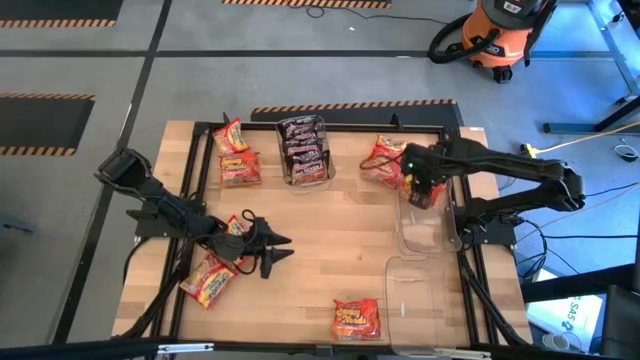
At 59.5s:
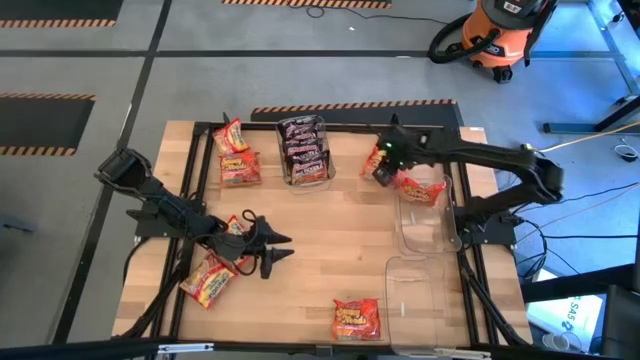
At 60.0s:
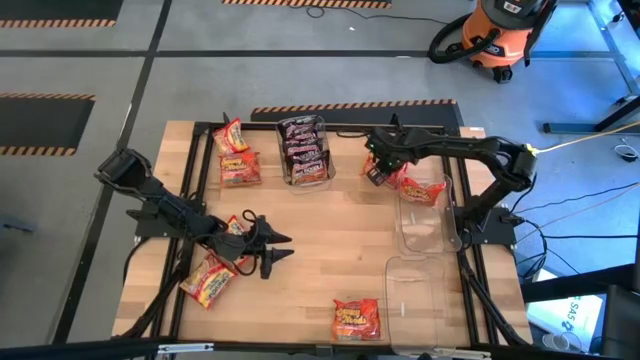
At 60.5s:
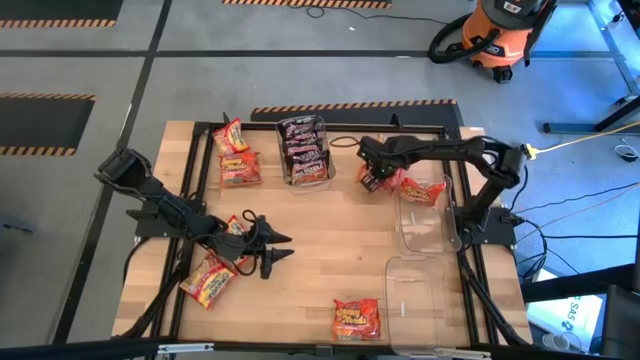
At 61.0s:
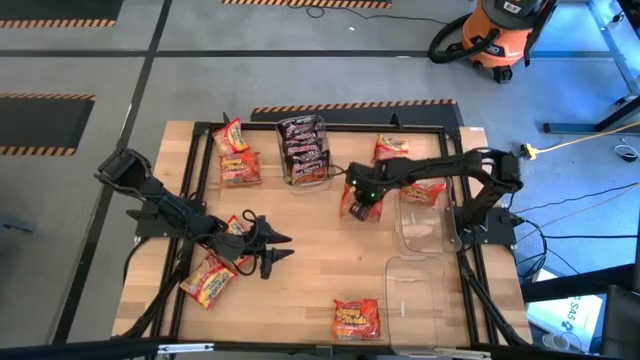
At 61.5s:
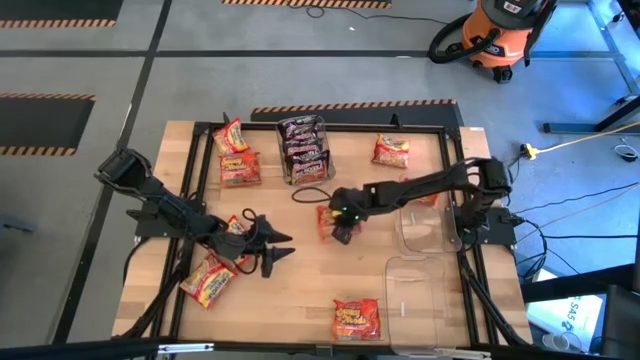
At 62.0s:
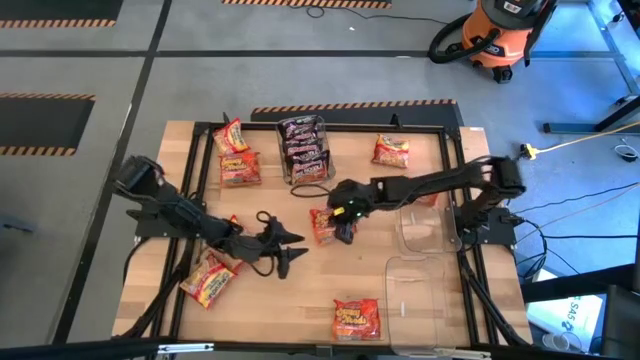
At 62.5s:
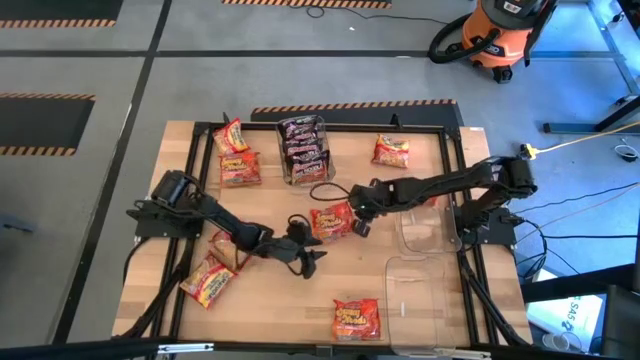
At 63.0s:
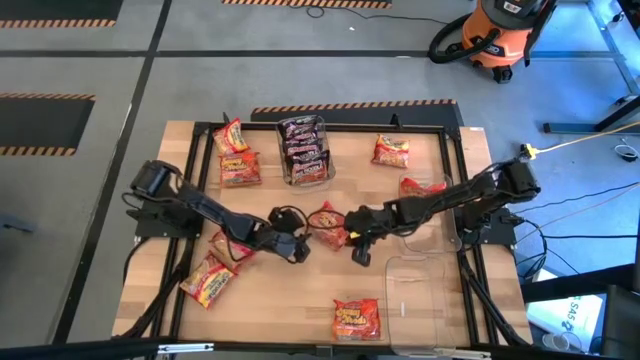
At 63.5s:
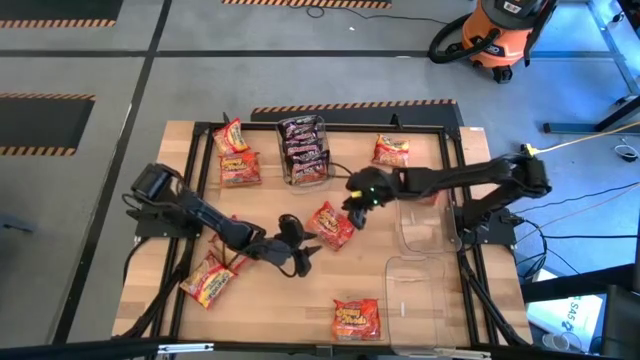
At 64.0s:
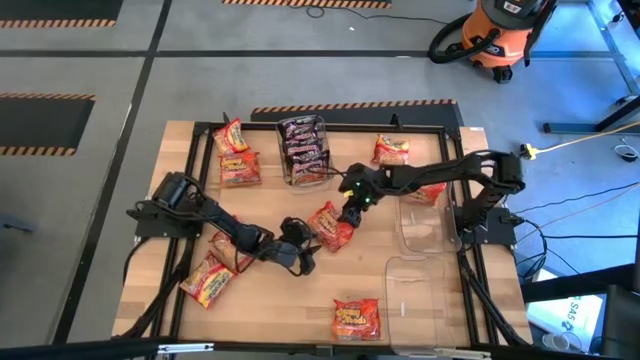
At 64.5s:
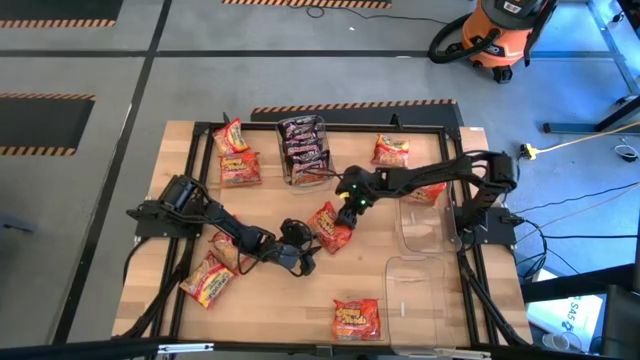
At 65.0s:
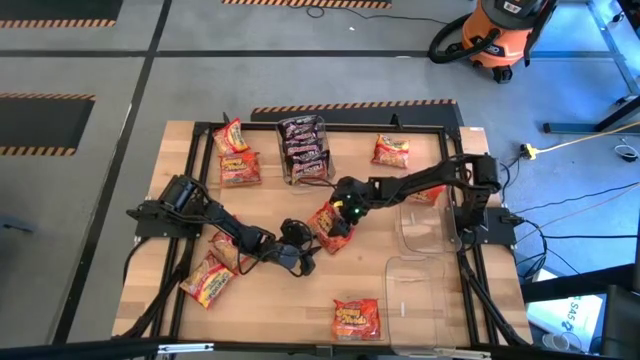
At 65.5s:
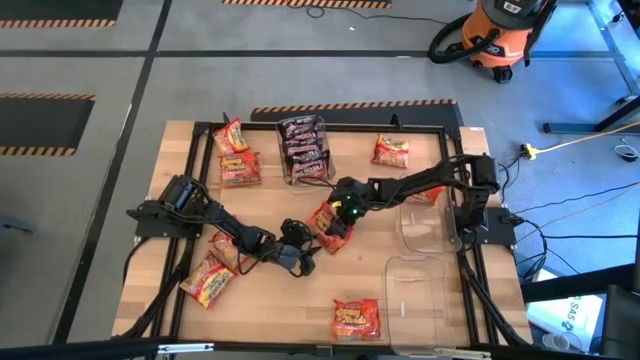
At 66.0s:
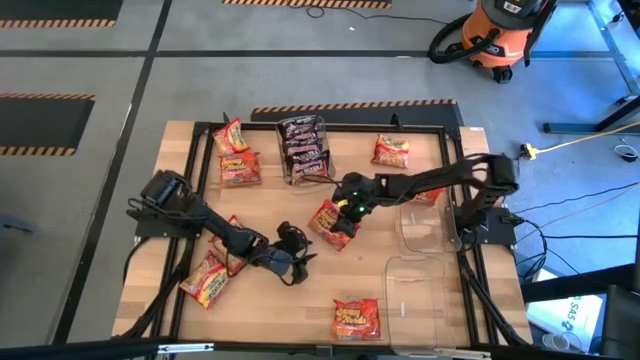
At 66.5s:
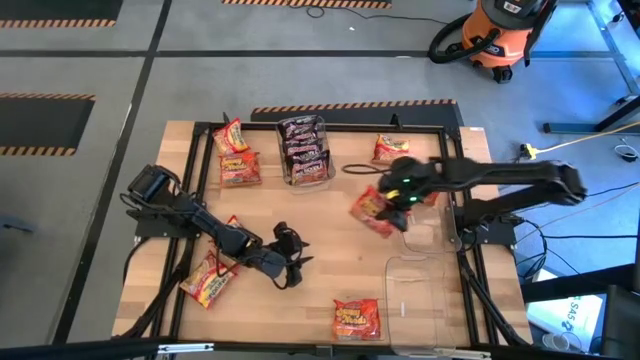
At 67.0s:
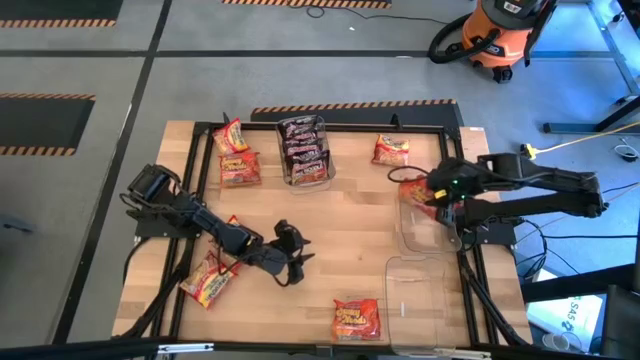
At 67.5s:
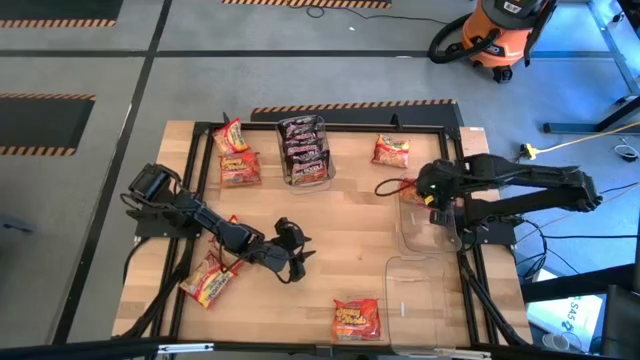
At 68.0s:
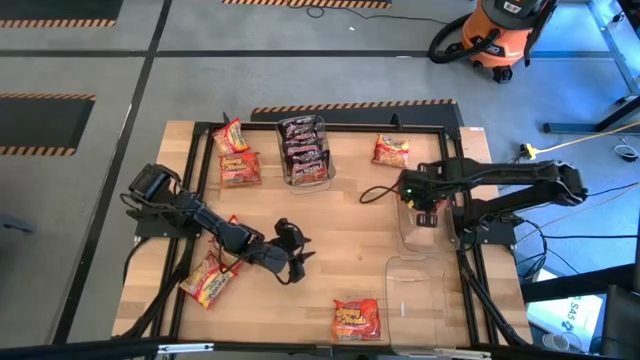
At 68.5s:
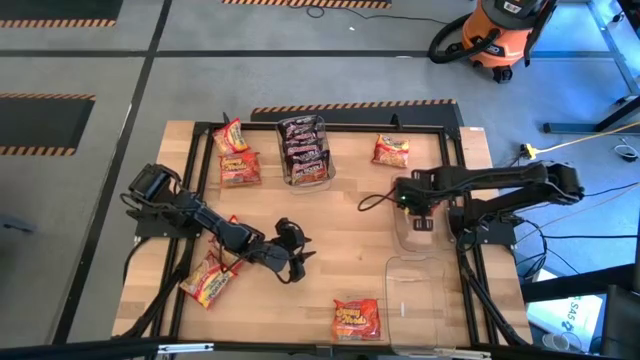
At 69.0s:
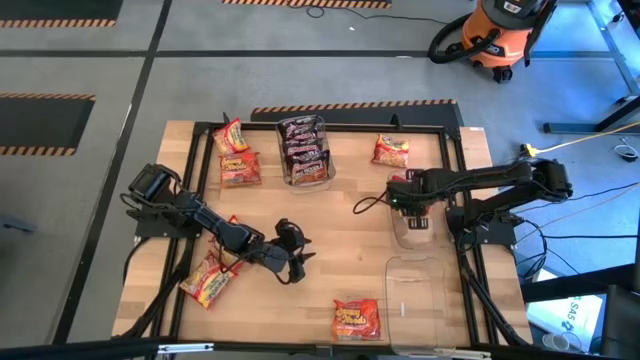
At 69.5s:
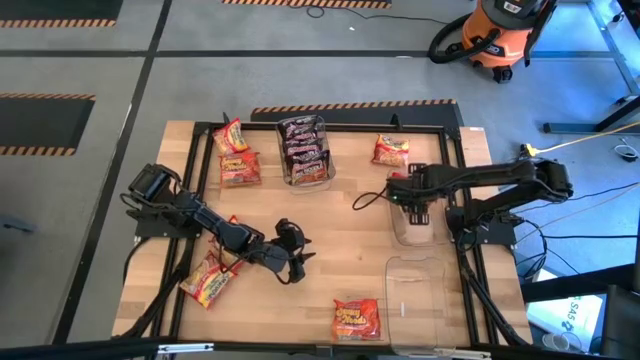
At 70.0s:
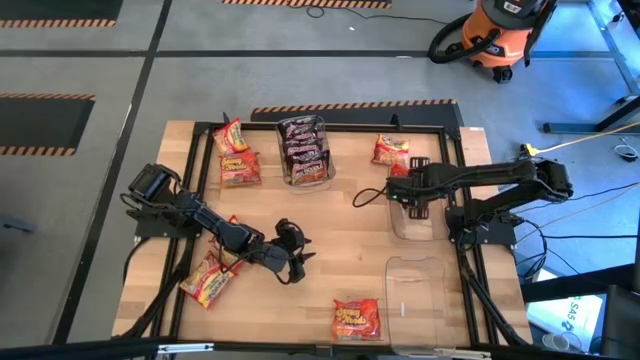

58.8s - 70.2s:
Task: Sort Maruchan noodles
Put the orange noodle pack into the middle transparent bin

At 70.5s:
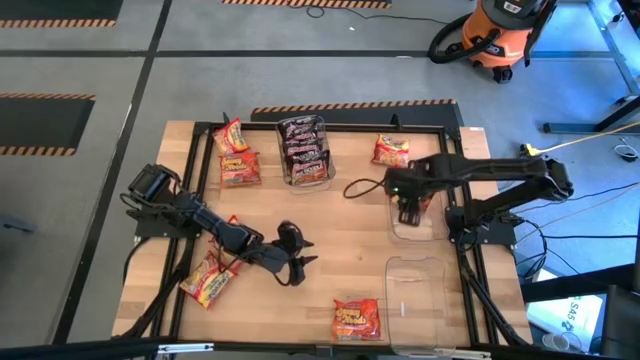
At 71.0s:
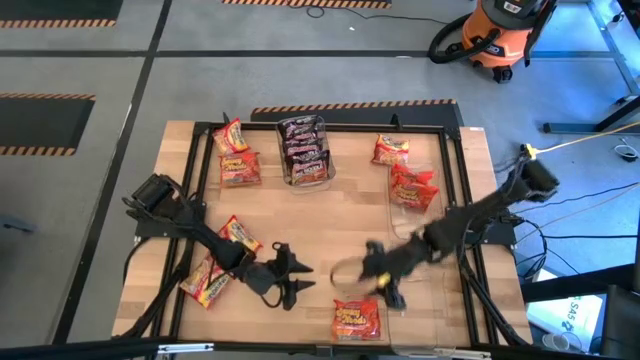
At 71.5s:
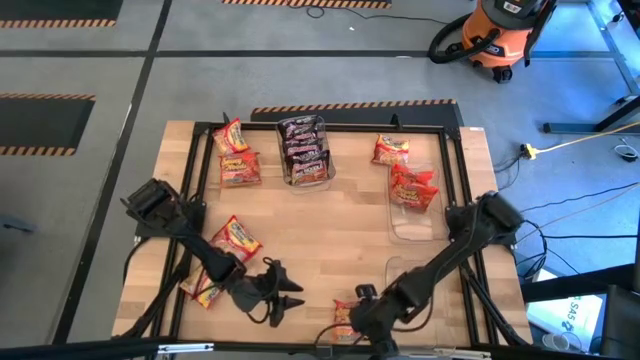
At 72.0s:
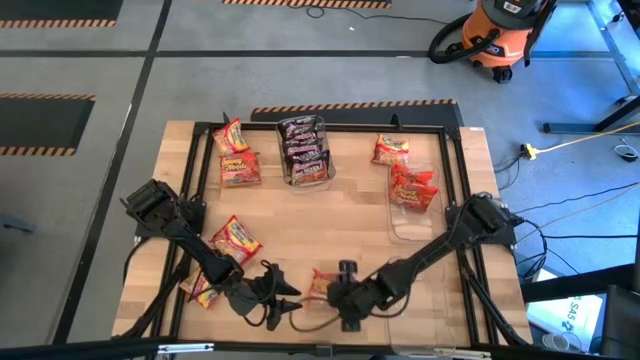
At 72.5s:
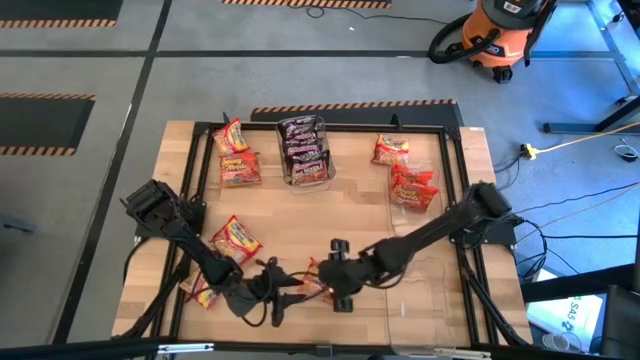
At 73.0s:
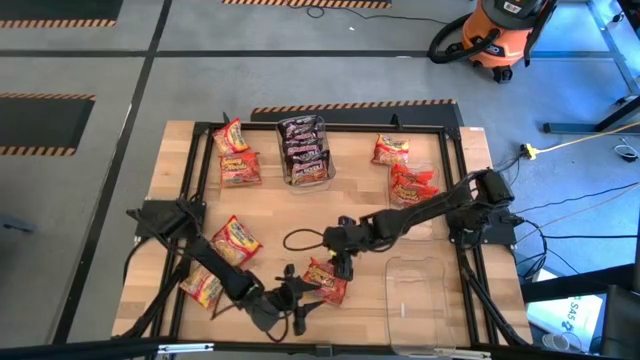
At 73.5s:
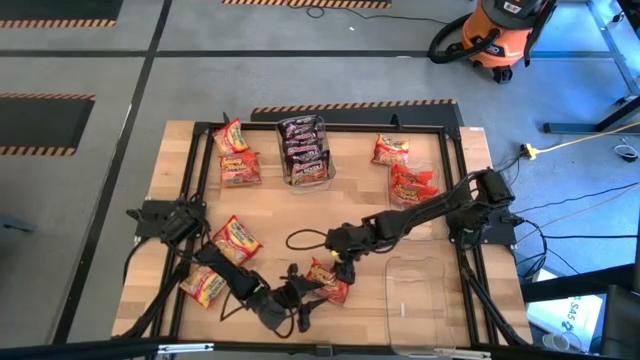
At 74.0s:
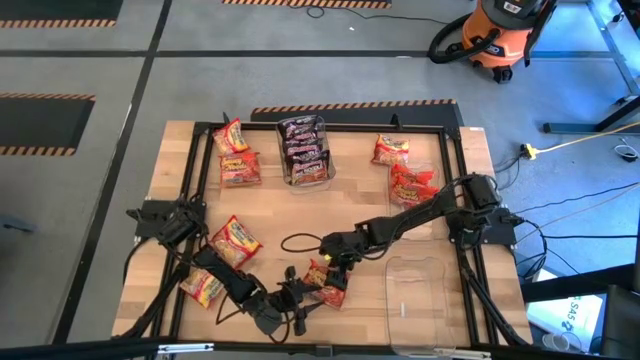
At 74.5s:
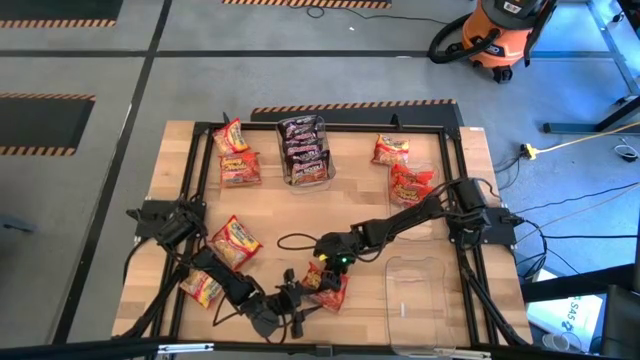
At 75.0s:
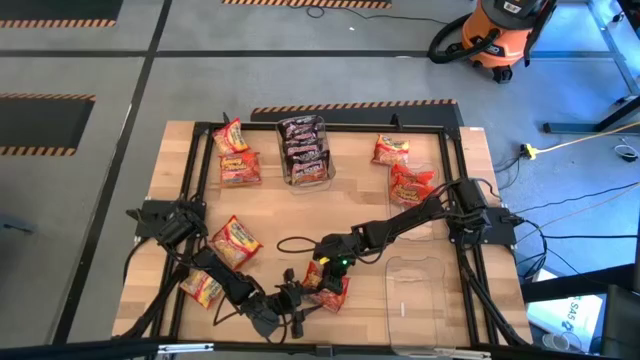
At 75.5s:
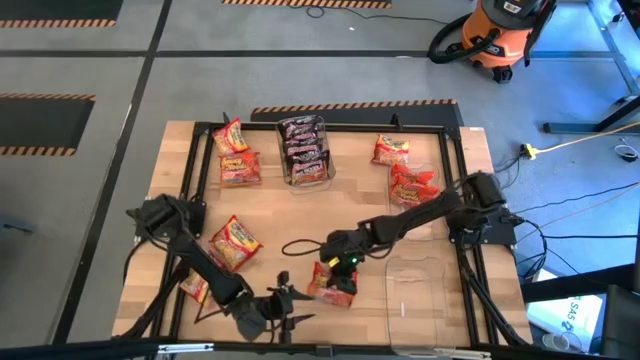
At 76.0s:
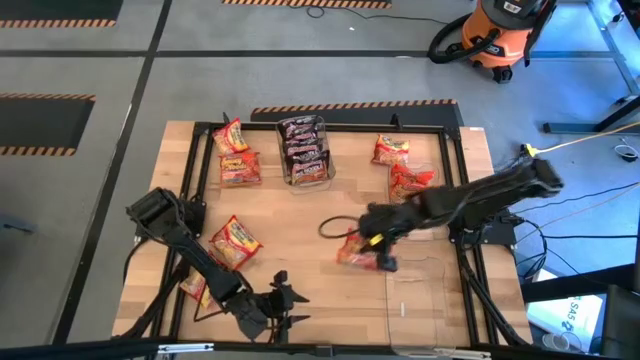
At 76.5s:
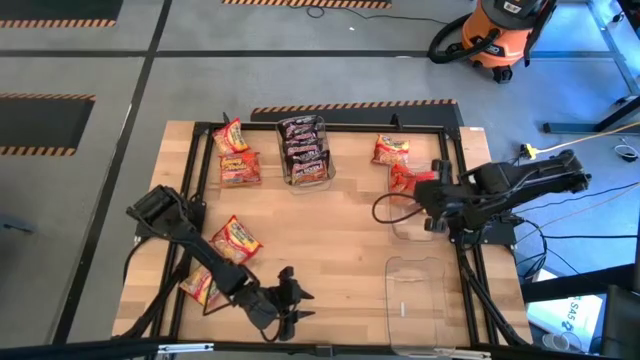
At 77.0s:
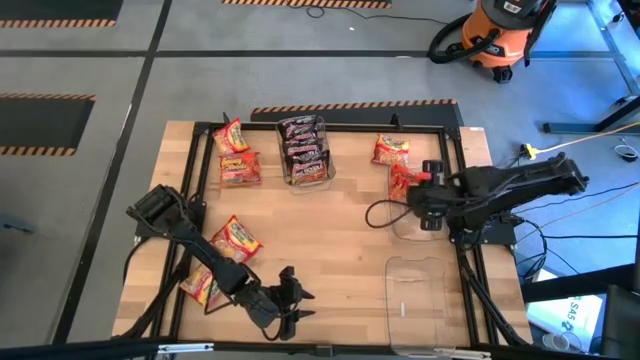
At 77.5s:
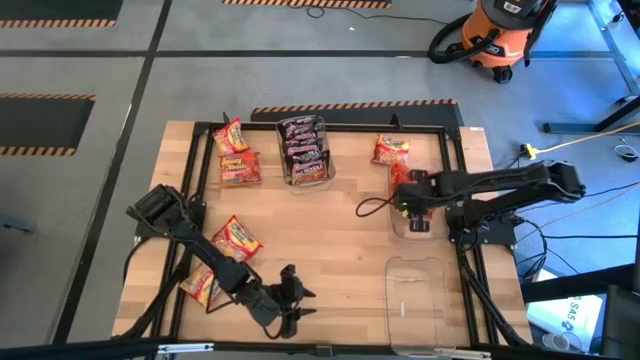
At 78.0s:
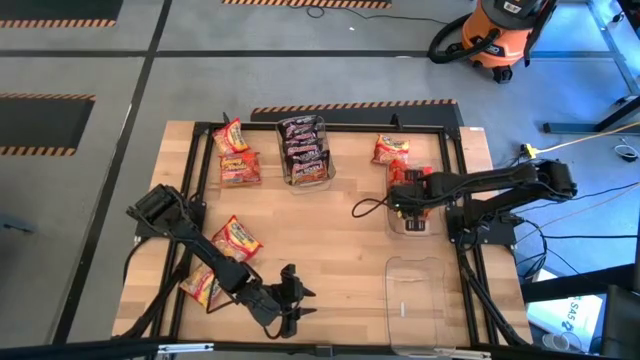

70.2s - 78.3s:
Put the orange noodle pack into the middle transparent bin

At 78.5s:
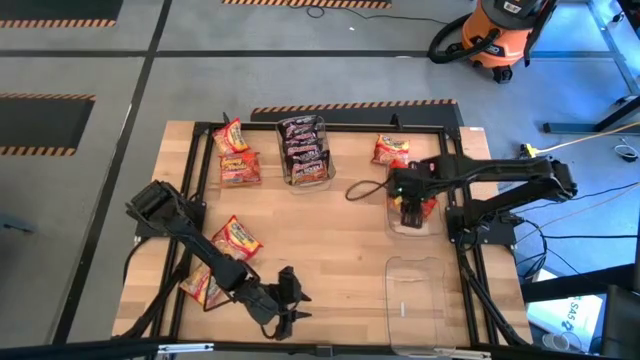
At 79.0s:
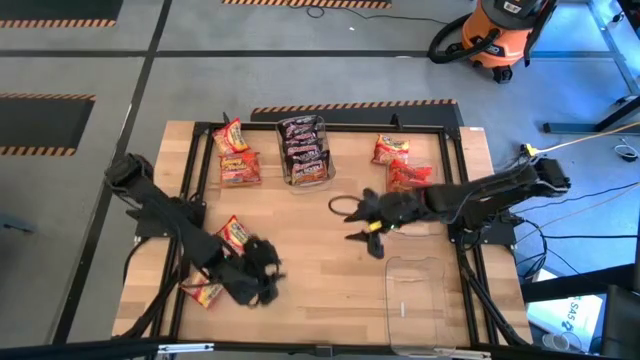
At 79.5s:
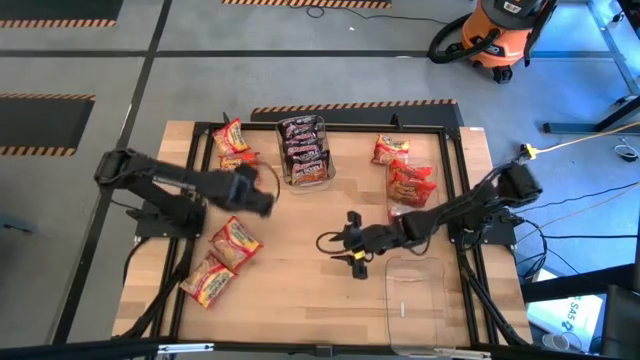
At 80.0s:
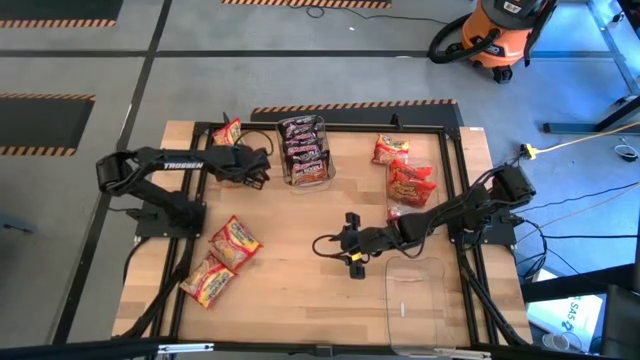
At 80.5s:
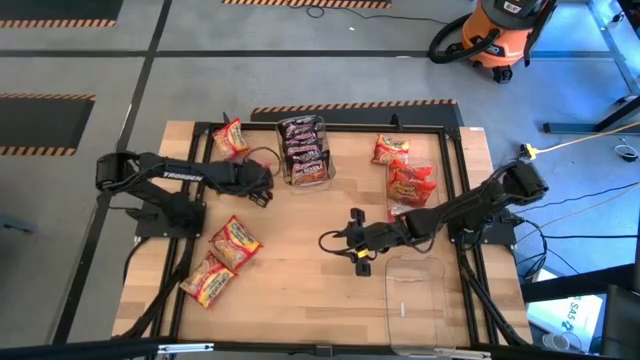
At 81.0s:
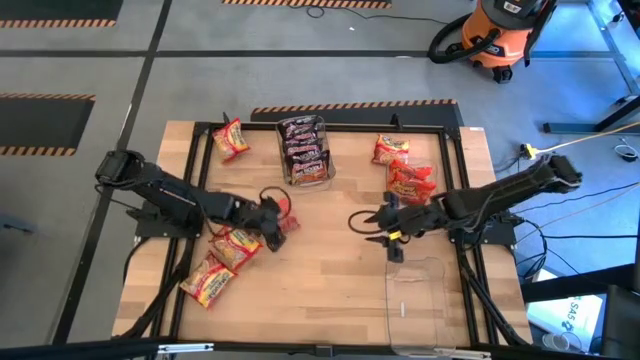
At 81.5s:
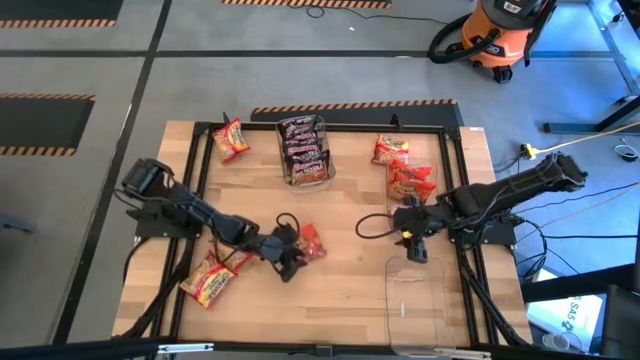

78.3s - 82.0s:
Move the orange noodle pack to the center of the table
